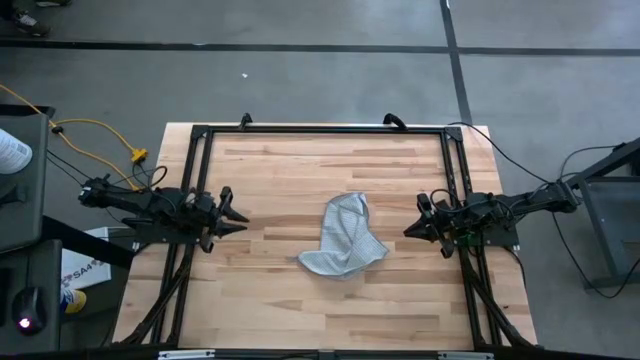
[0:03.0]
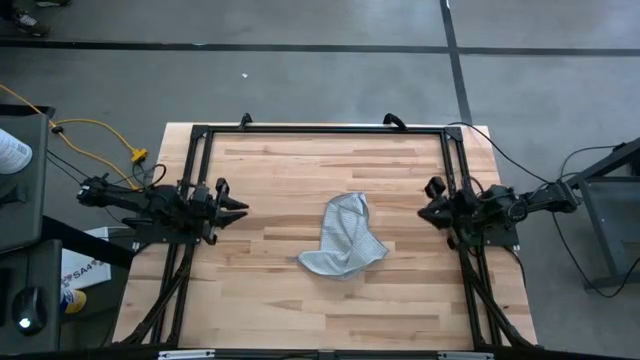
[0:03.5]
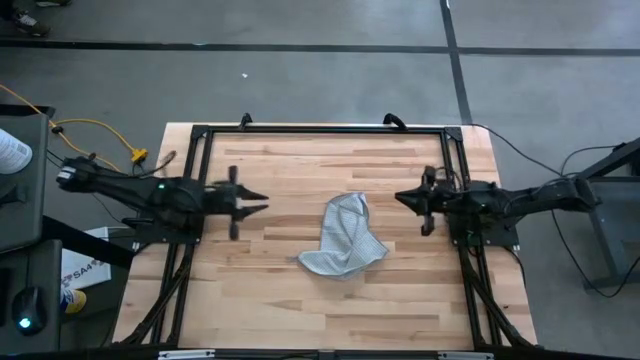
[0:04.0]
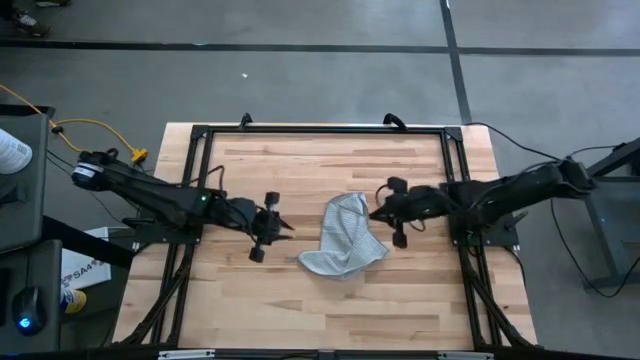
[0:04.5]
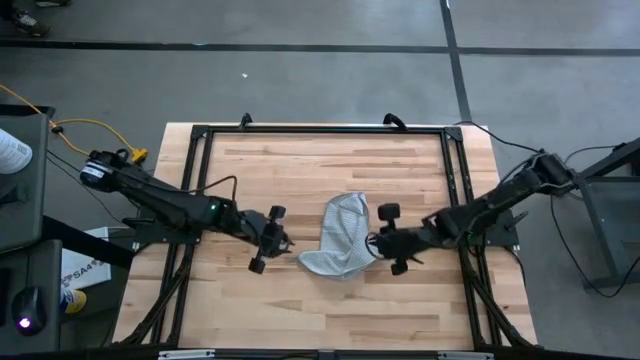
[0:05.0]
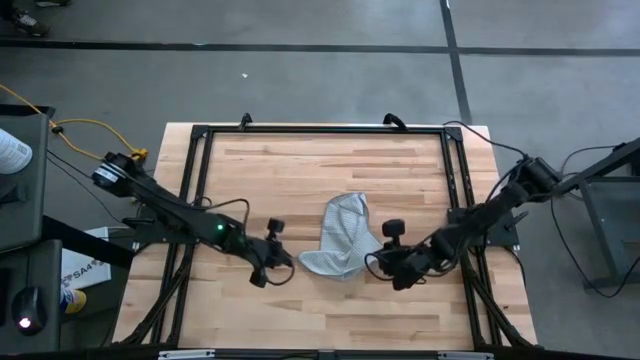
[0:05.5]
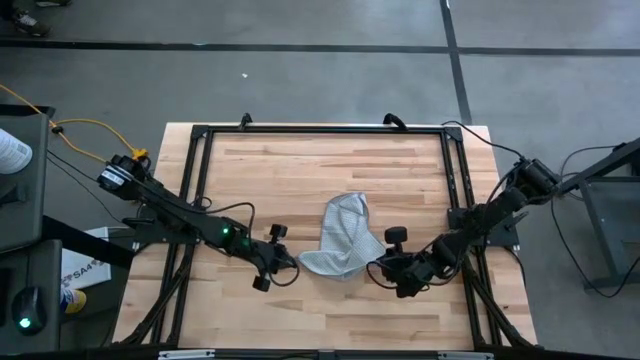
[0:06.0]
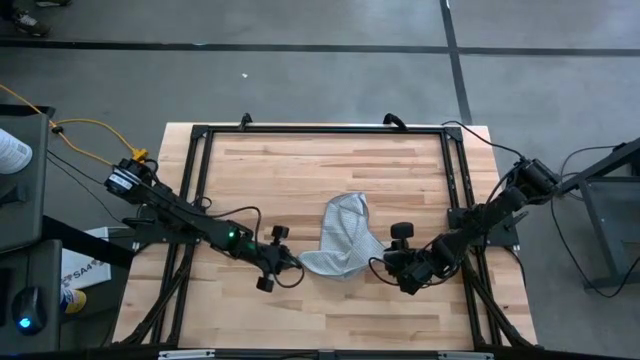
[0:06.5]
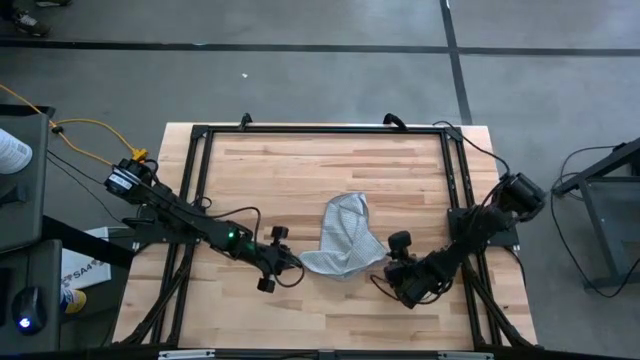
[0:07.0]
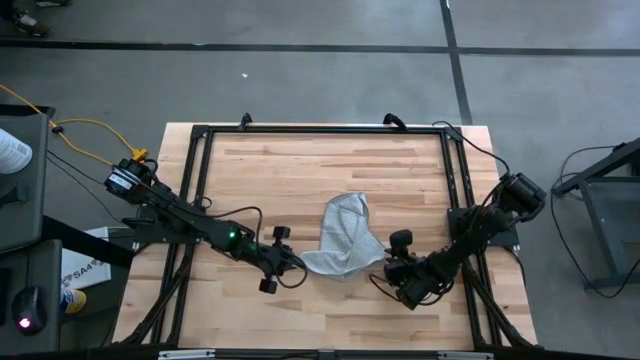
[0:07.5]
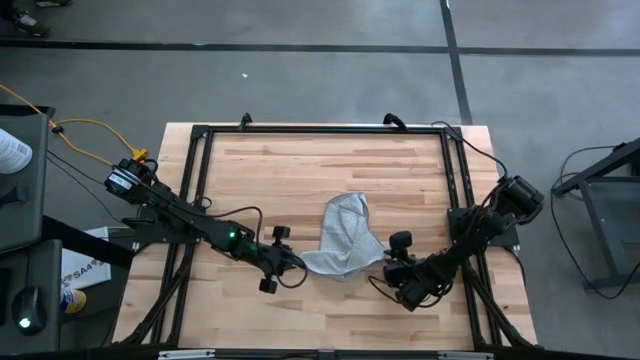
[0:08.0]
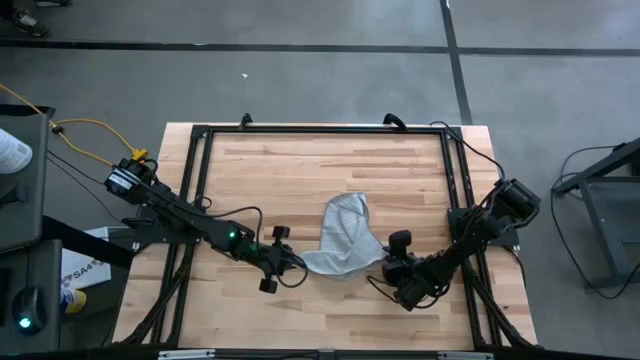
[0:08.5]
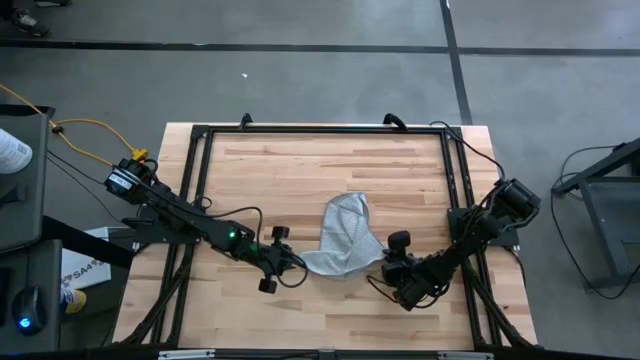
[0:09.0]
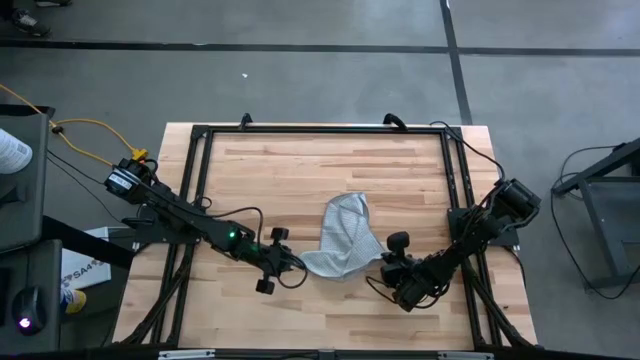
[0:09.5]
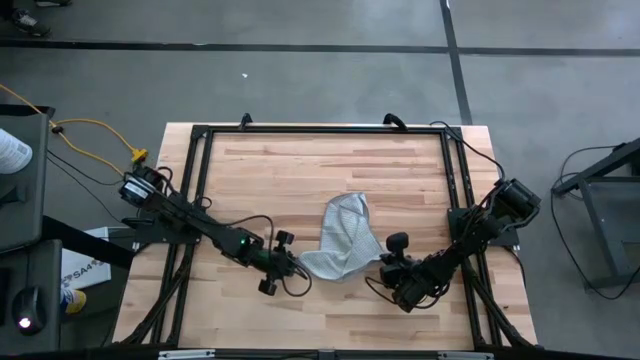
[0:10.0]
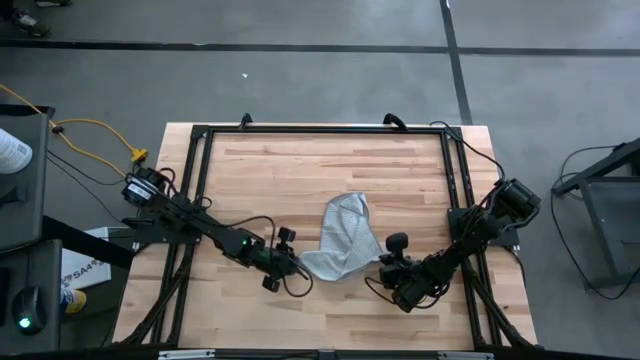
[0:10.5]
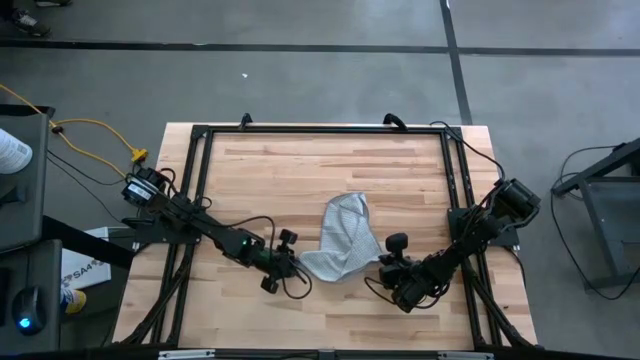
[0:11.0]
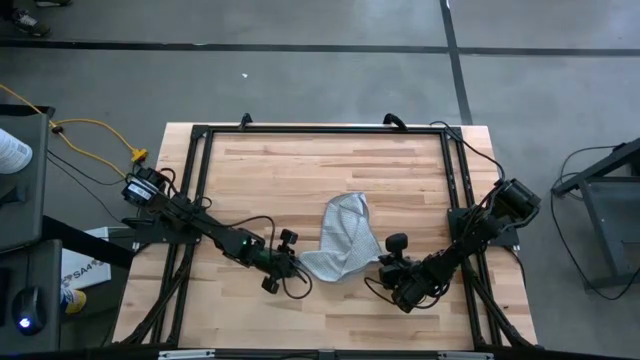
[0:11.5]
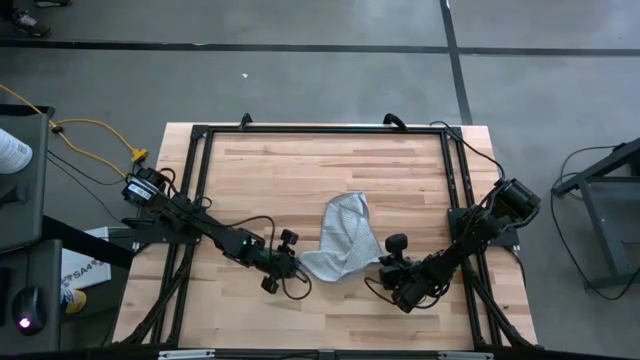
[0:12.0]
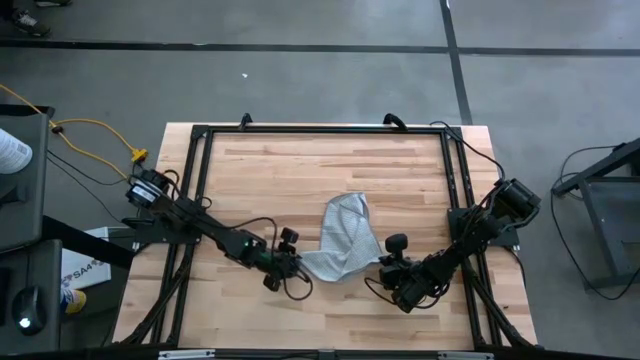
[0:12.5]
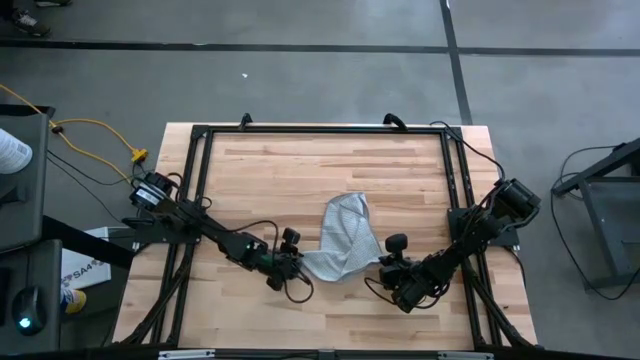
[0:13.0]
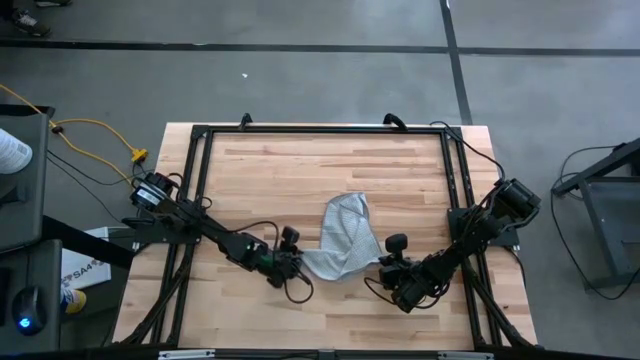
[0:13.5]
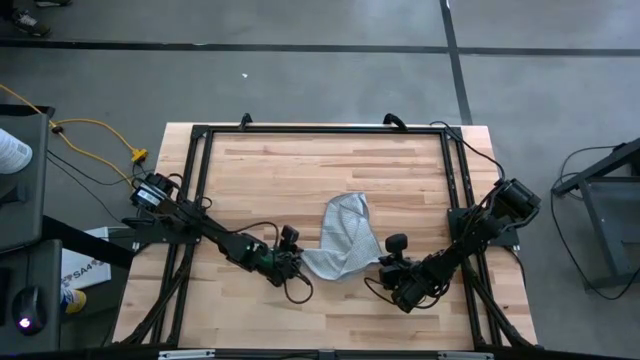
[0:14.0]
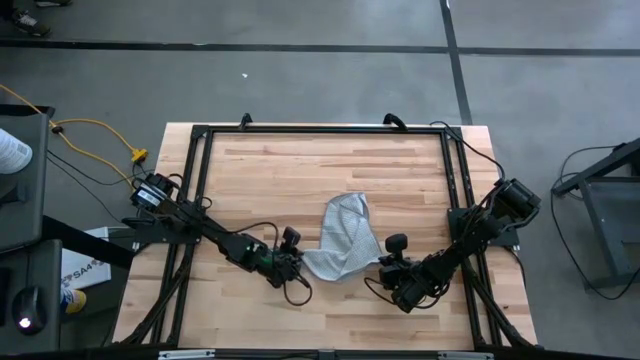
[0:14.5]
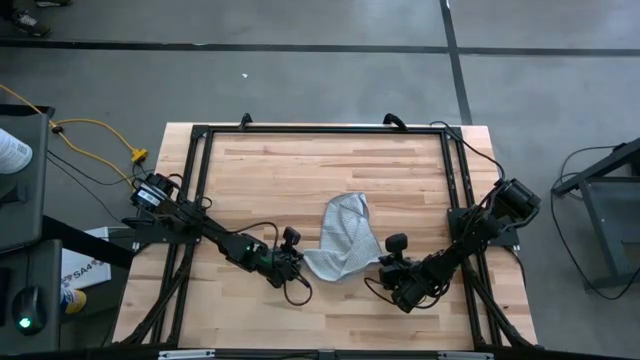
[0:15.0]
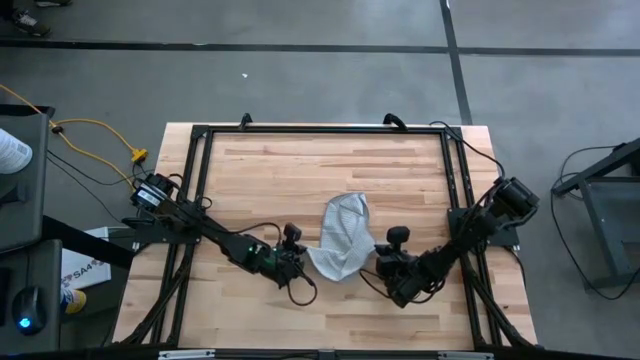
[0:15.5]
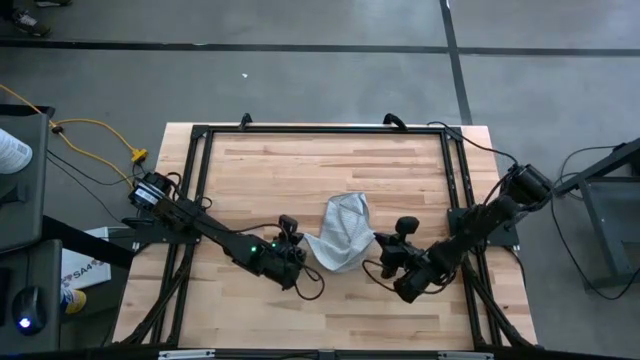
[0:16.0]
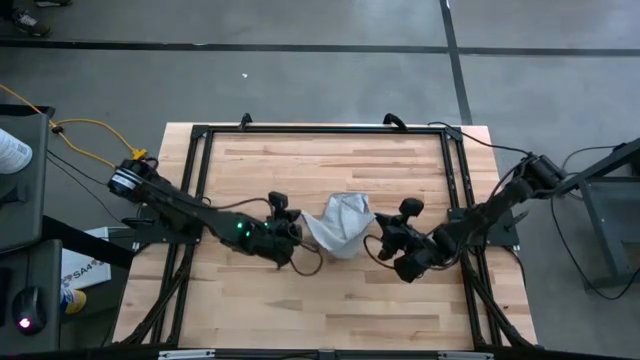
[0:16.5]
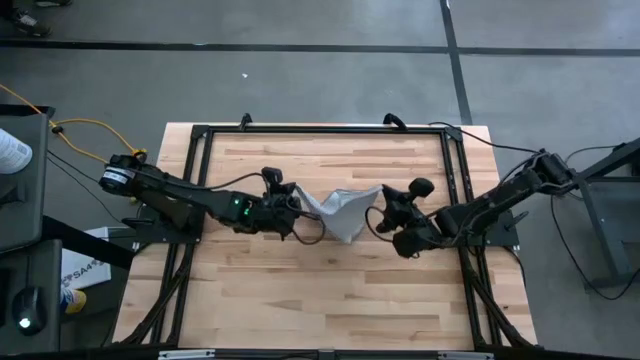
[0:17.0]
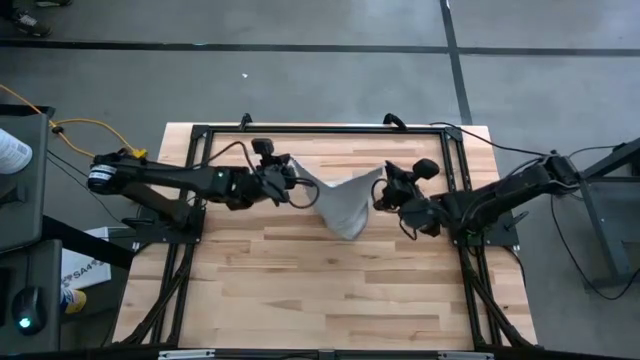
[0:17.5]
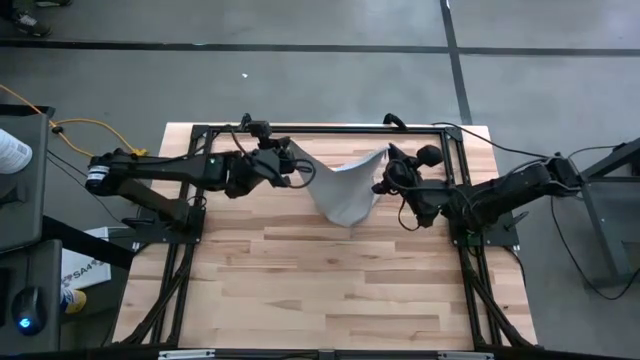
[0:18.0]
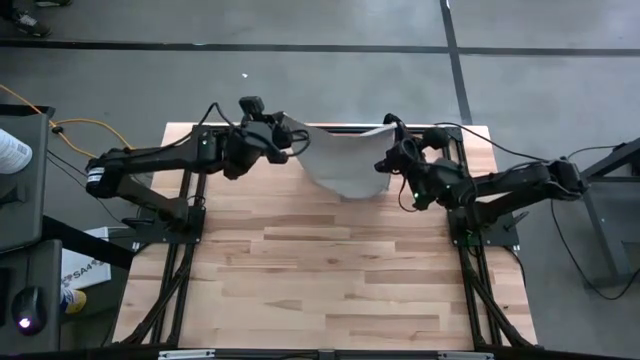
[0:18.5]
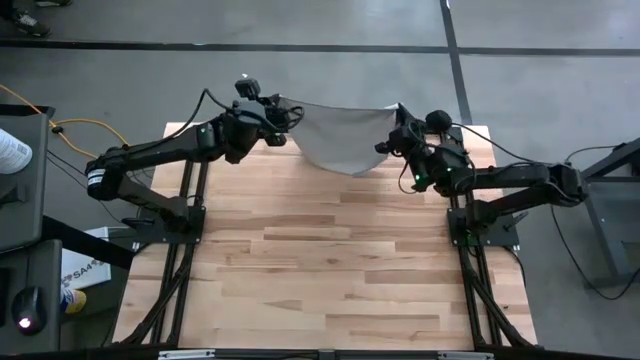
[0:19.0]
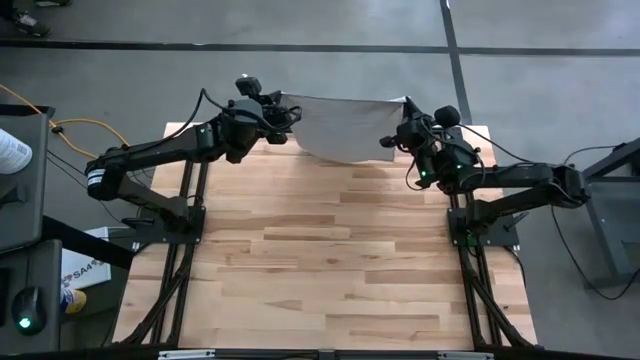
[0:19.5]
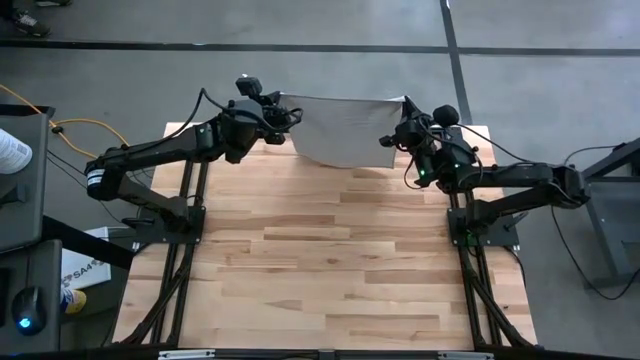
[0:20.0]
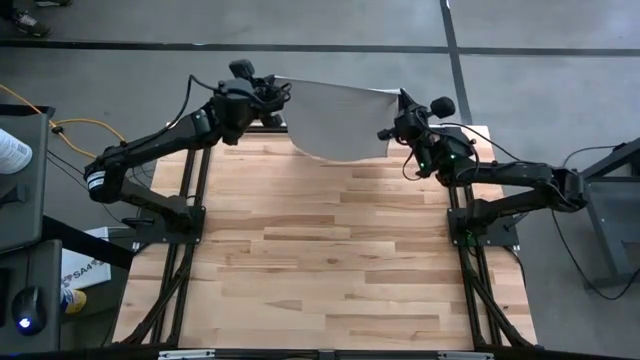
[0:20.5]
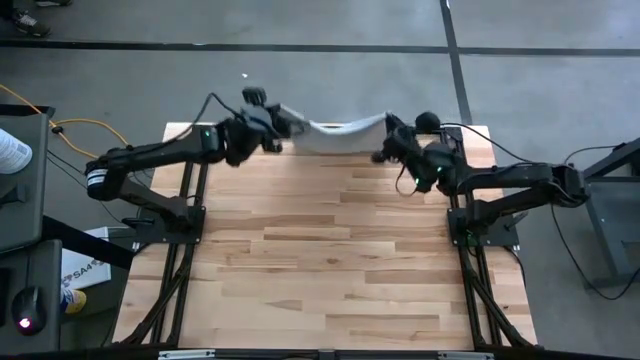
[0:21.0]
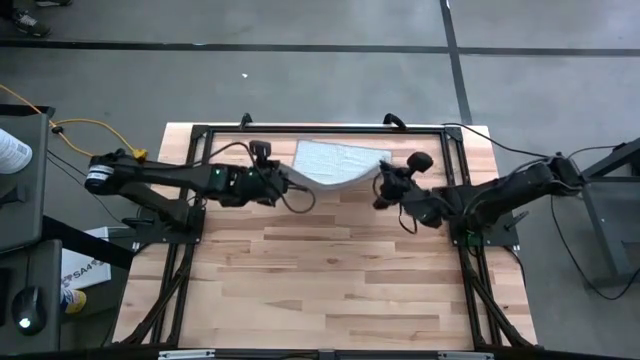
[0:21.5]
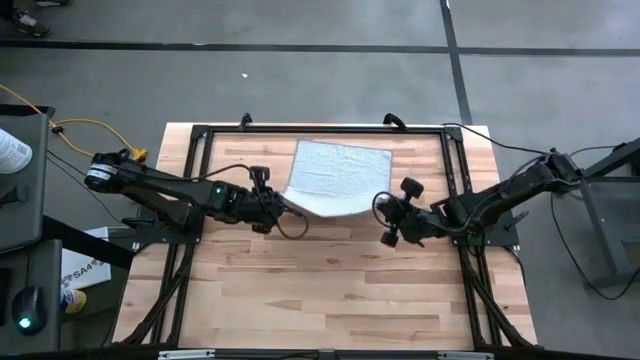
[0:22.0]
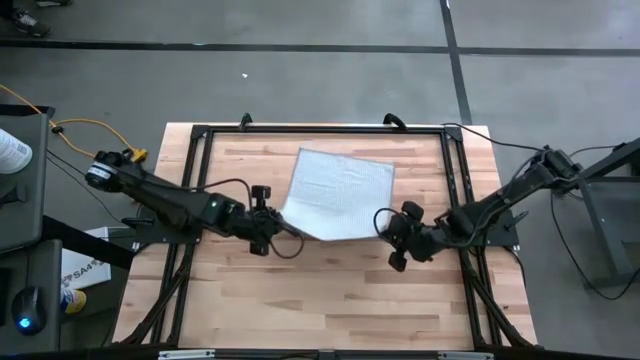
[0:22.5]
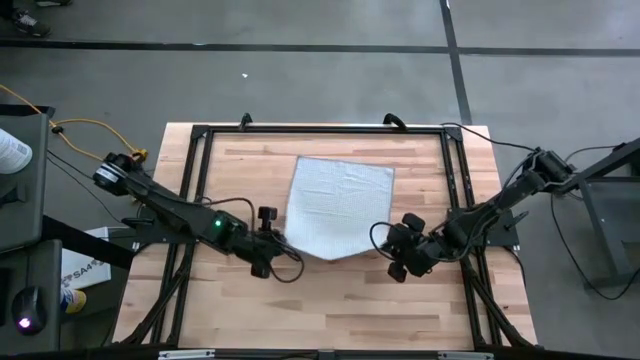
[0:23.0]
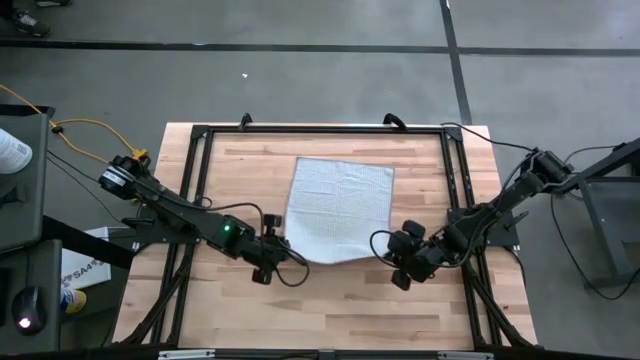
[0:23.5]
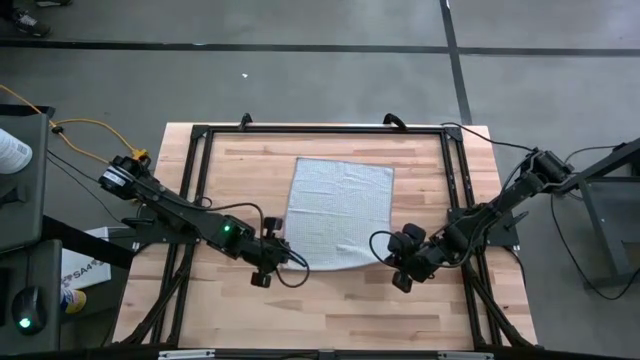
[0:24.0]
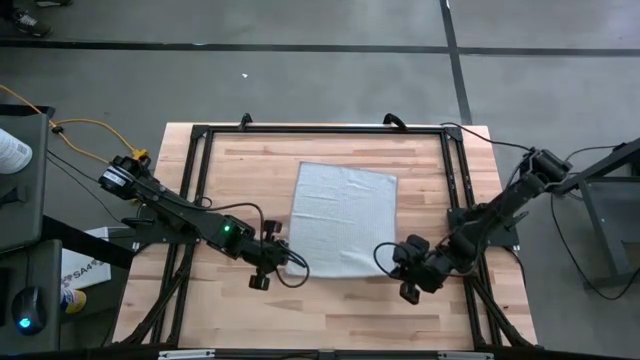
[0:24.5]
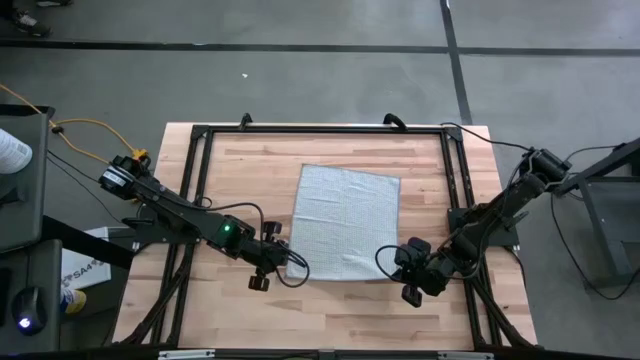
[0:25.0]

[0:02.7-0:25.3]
Task: Fold microfiber towels
Fold the gray towel on the table
